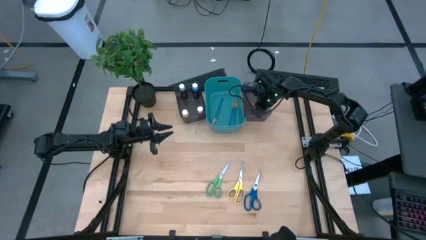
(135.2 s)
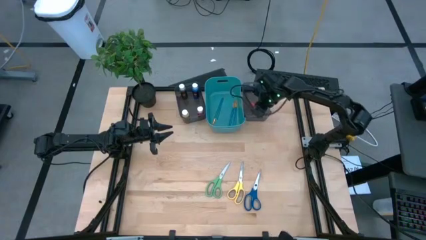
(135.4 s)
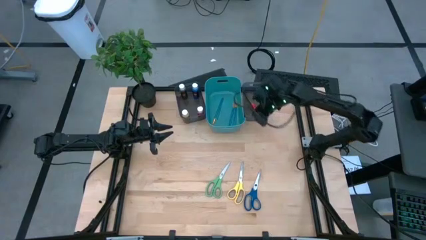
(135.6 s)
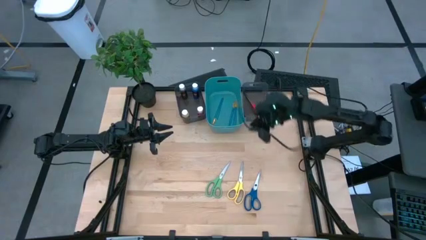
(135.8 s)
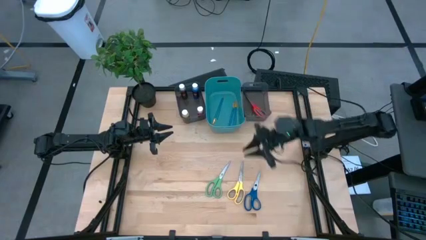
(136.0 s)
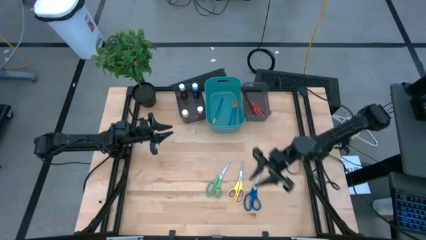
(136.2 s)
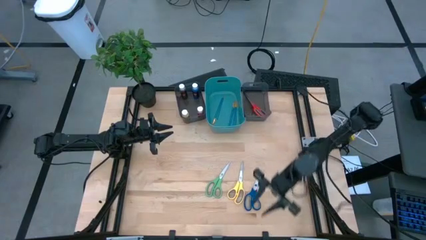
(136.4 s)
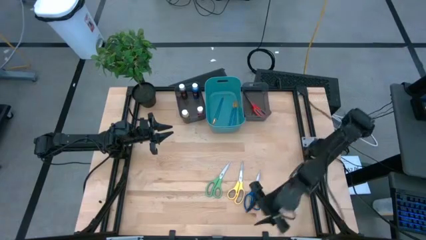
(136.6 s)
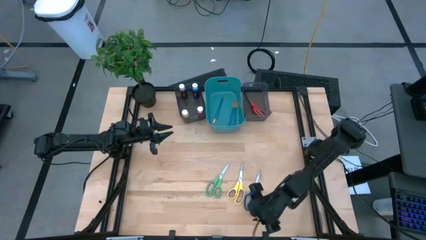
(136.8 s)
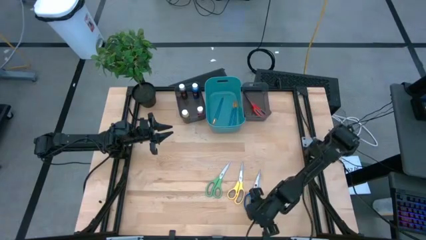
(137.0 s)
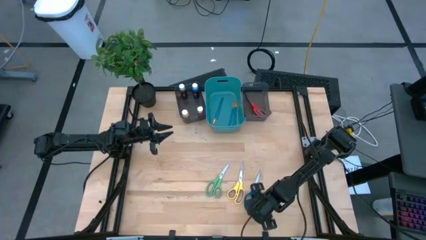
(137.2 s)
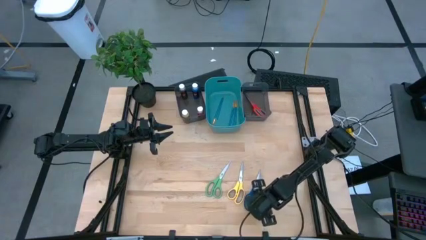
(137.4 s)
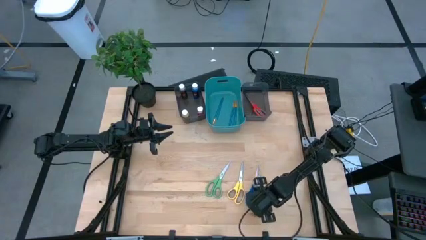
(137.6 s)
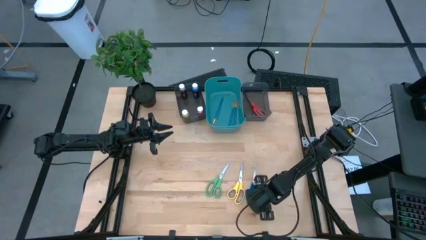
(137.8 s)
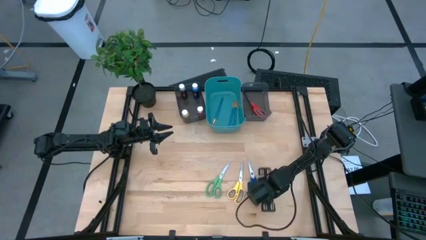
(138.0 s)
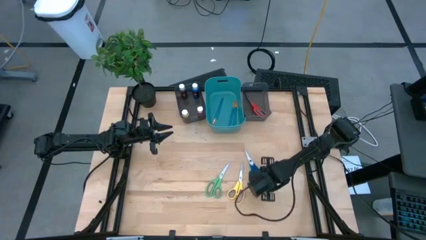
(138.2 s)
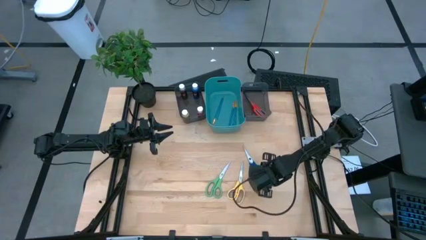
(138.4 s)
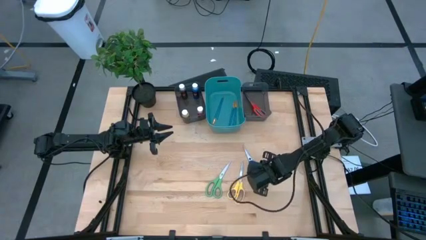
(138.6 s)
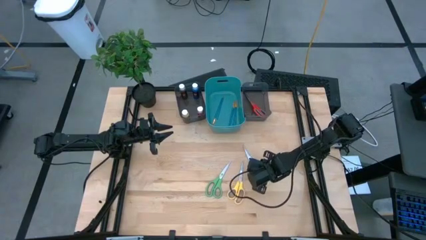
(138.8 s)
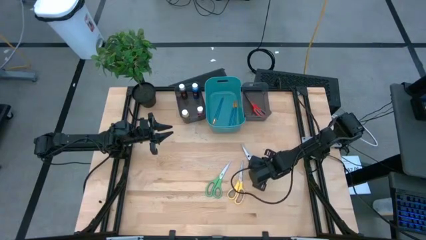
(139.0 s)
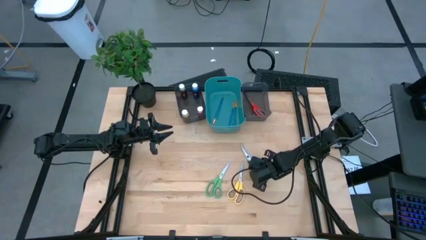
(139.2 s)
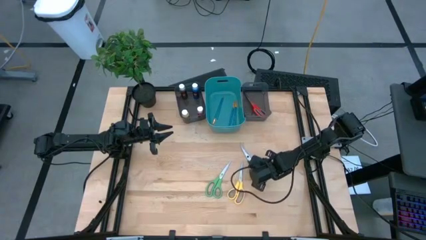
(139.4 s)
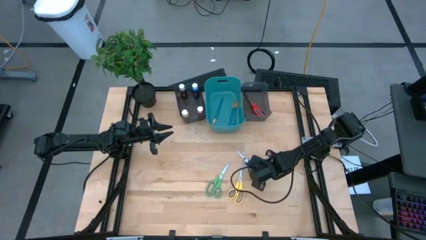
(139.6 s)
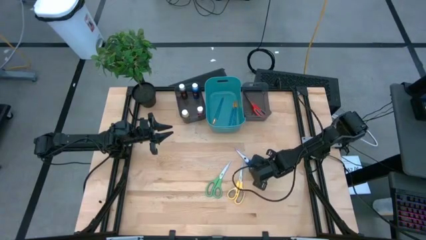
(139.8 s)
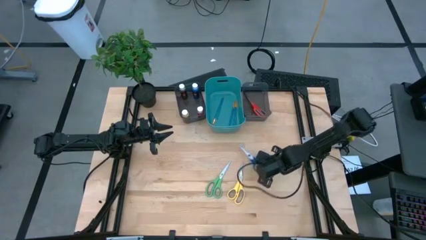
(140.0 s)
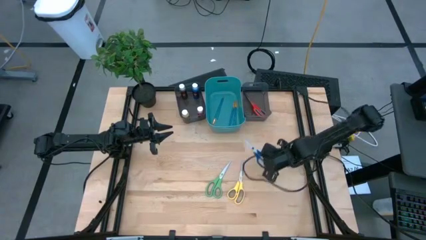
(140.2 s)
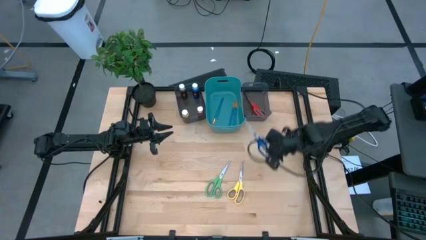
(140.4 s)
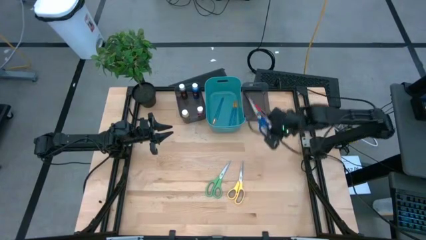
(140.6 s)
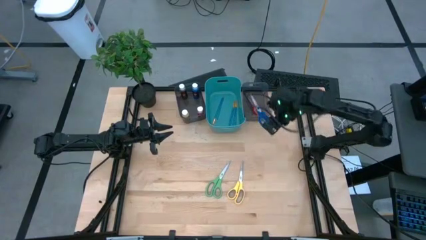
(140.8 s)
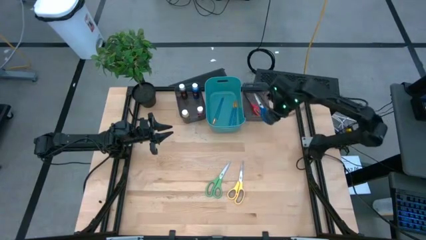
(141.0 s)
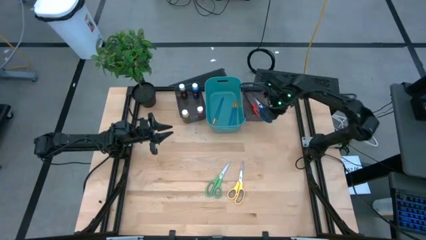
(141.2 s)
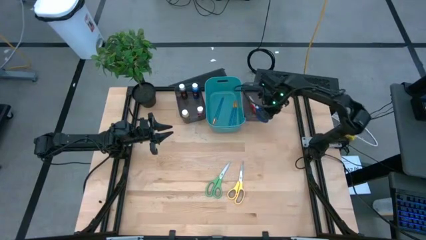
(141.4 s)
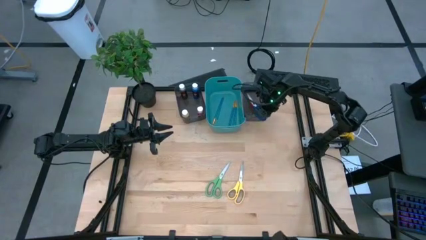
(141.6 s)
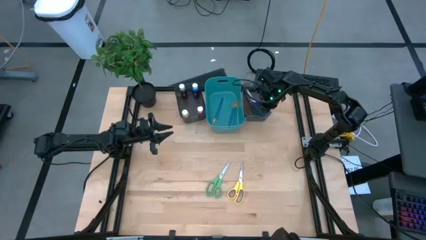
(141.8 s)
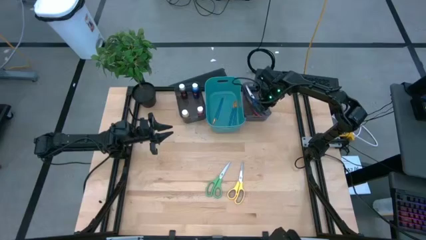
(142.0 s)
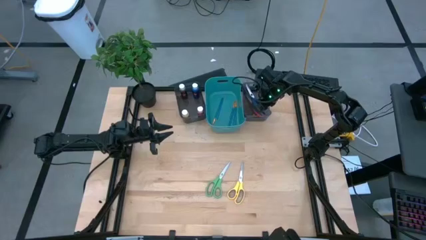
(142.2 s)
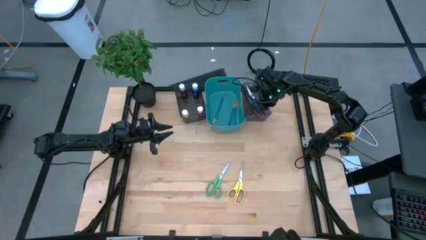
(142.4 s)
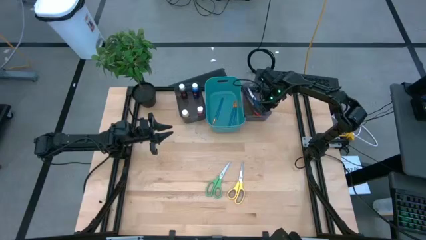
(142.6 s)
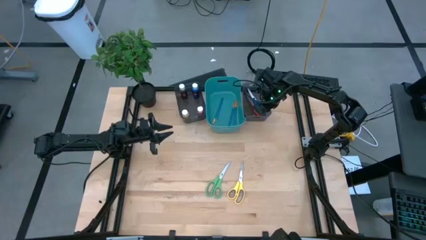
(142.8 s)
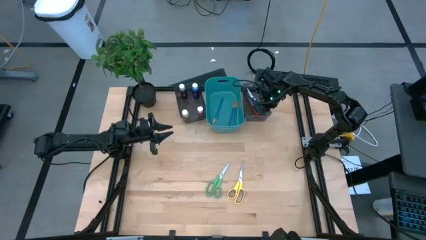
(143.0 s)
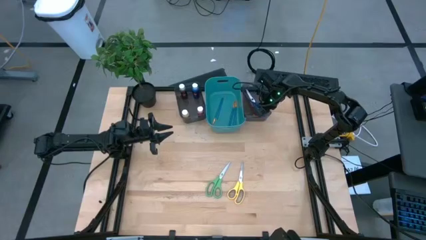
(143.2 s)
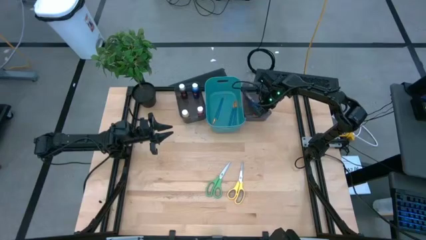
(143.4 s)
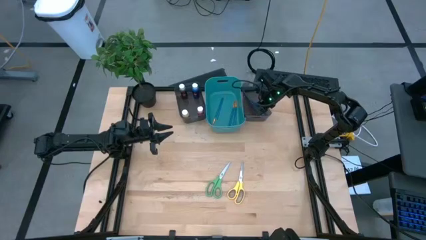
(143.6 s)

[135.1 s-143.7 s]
Task: Pick & Place Paint Supplies
Put the blue scissor into the right black bin

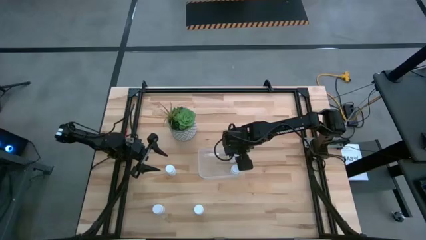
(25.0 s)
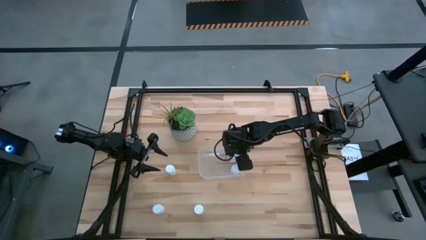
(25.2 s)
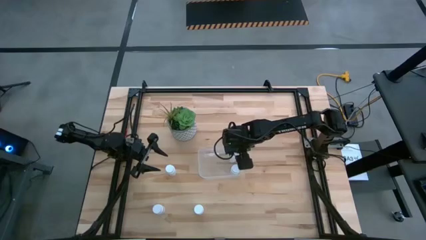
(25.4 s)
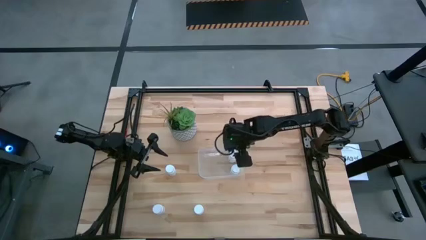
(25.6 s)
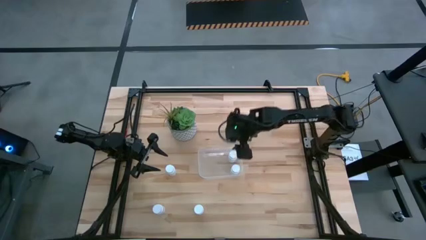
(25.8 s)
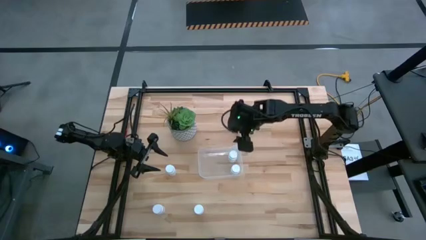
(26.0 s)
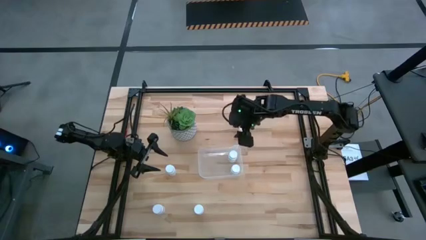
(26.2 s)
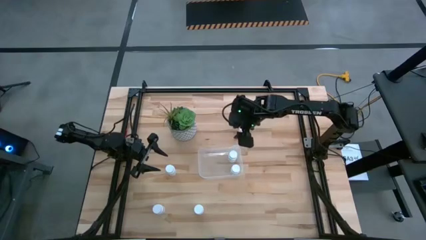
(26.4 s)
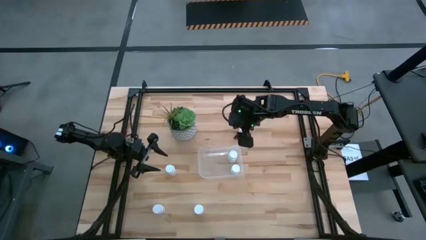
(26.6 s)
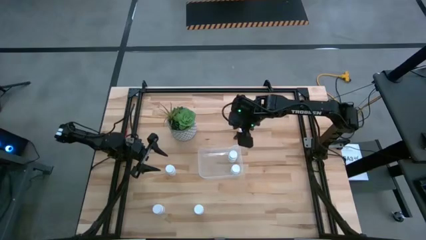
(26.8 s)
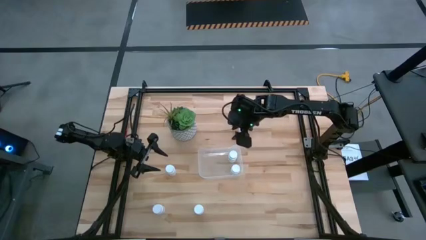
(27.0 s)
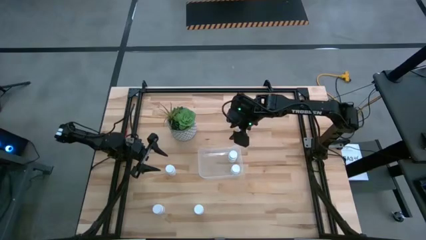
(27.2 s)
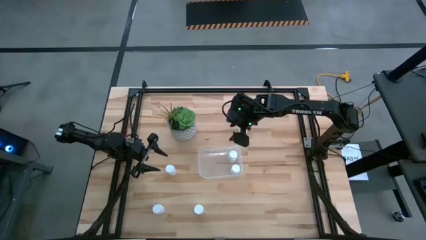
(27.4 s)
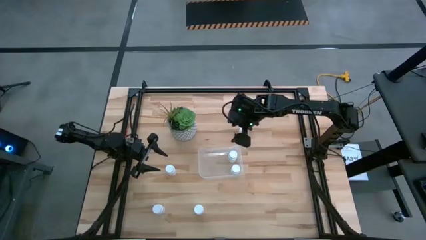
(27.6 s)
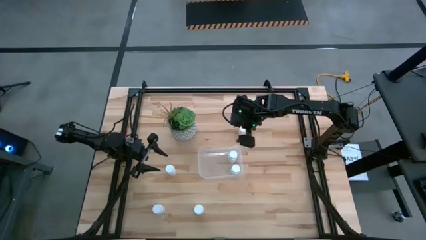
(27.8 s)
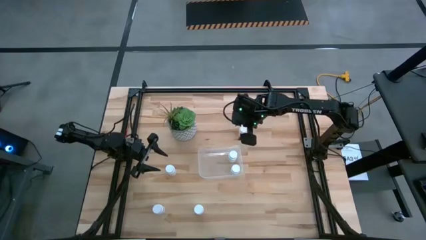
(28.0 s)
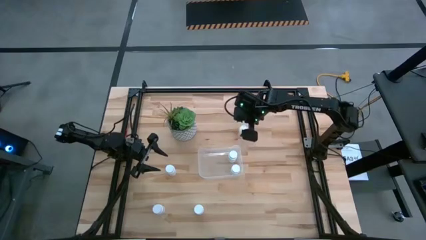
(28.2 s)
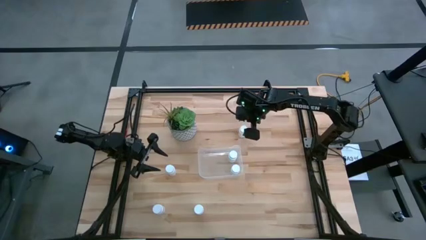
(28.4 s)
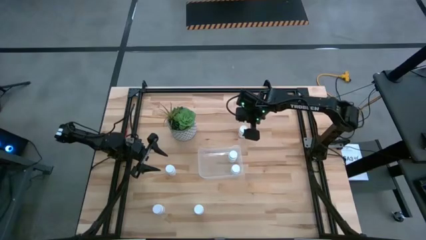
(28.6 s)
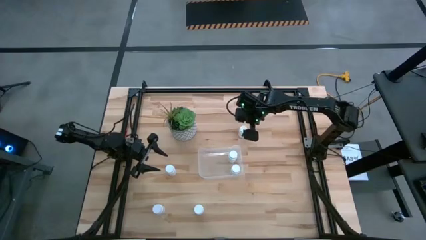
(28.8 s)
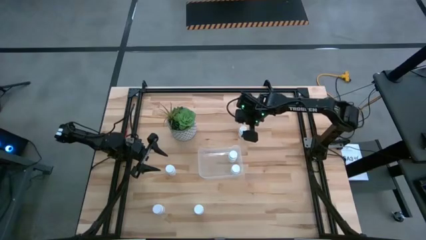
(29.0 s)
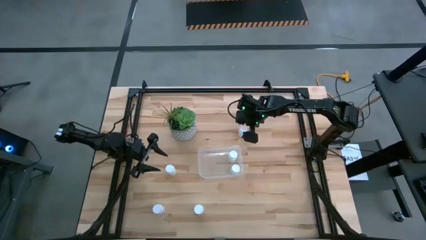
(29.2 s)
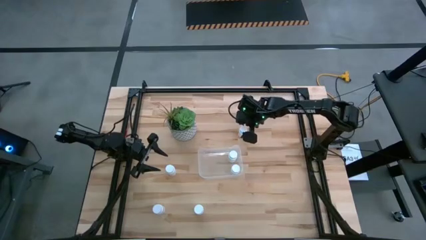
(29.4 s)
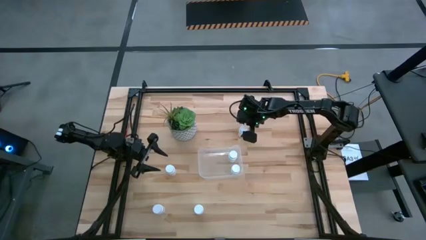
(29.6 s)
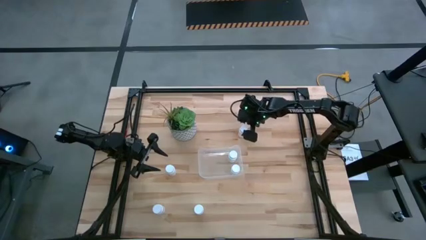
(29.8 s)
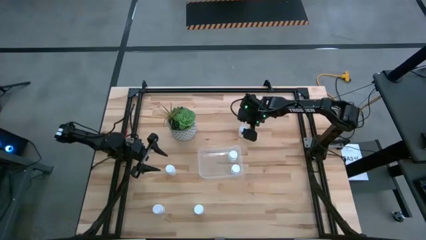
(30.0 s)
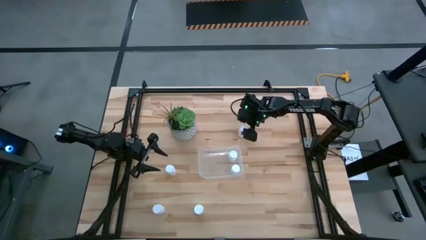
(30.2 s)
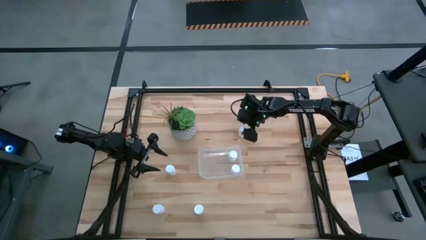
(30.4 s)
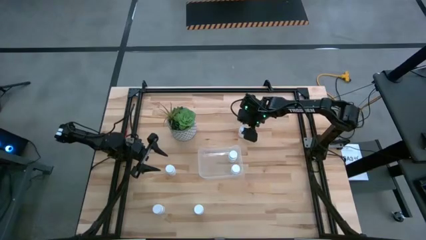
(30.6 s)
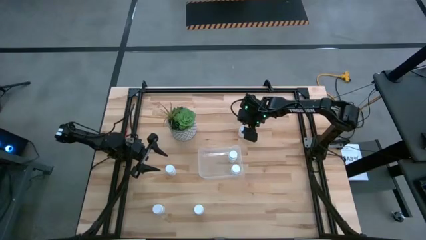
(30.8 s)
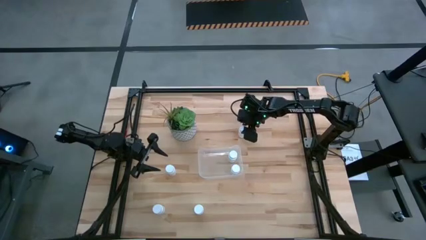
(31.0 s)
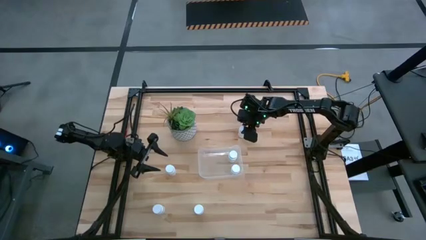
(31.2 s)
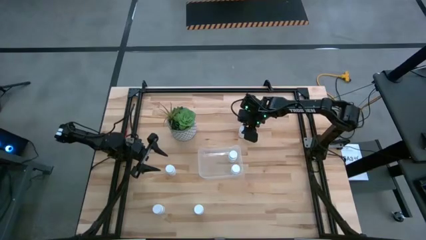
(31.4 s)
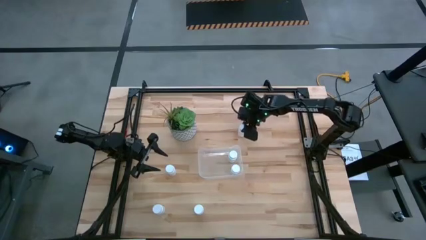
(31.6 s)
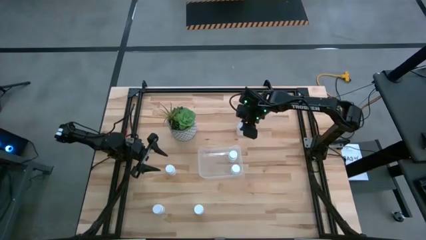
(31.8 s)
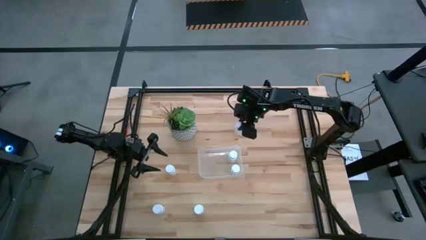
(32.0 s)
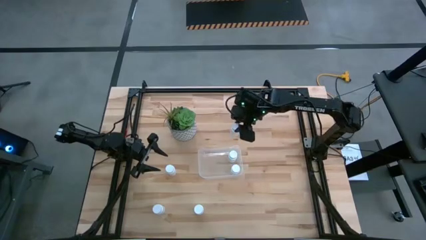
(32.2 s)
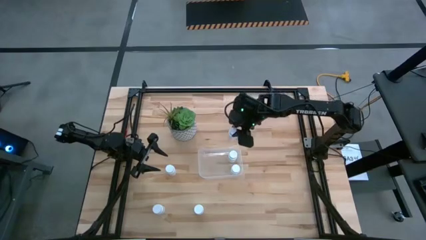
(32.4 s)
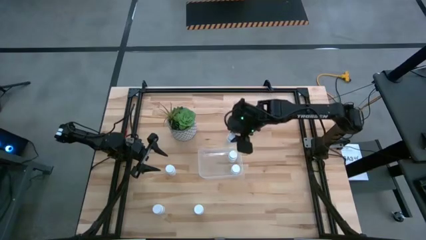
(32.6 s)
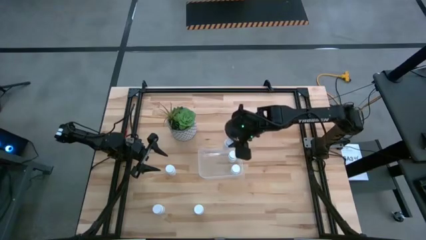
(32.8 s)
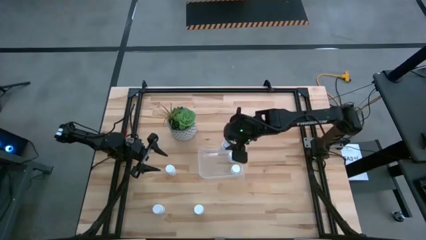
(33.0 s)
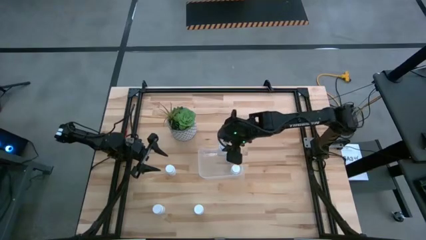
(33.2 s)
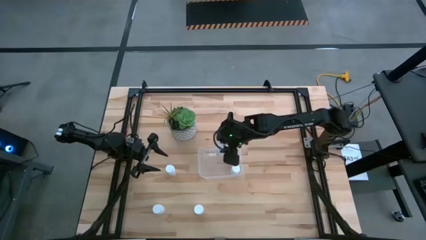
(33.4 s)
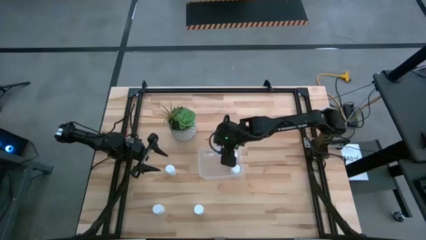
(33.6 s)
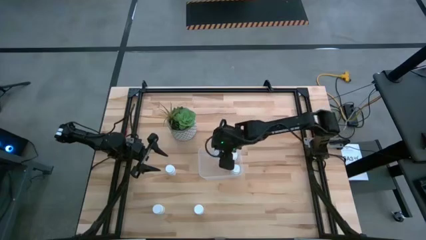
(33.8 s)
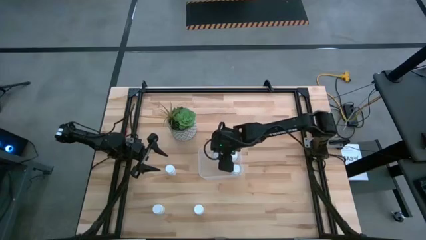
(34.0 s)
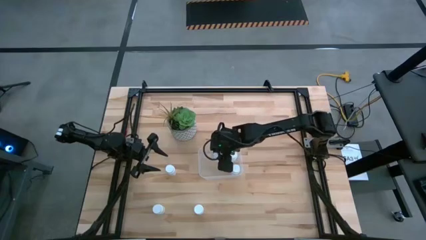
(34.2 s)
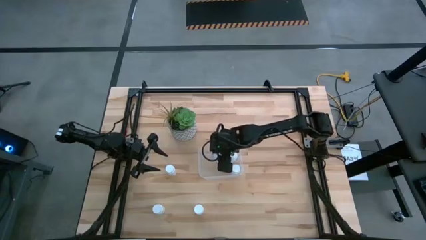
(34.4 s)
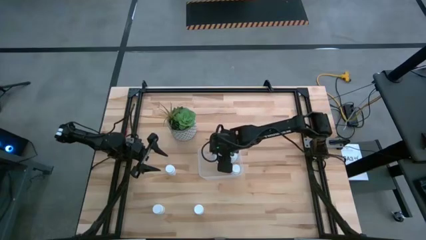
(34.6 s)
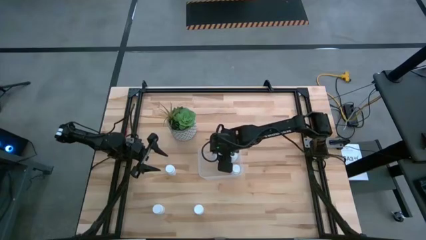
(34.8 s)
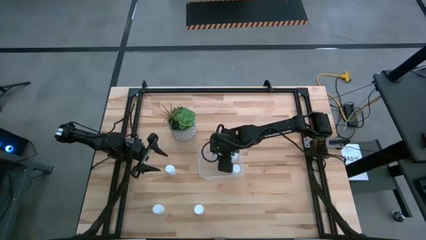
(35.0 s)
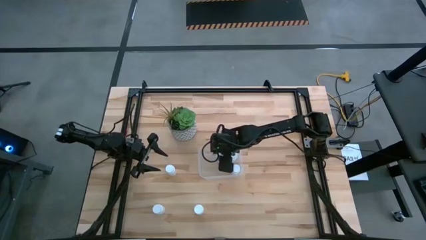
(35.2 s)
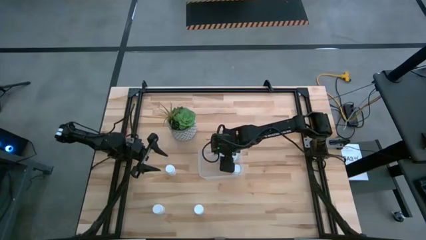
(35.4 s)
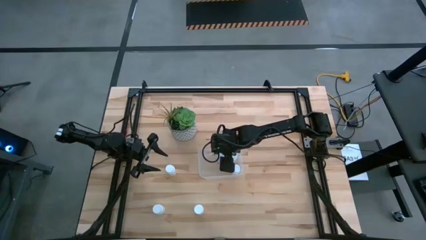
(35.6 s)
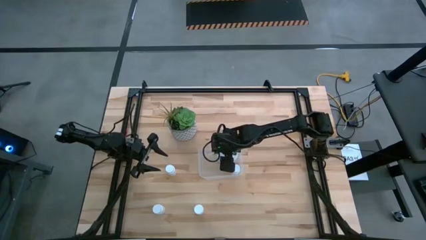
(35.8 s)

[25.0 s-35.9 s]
Task: Pick and place pill bottles into a basket
Put the white pill bottle into the transparent bin
